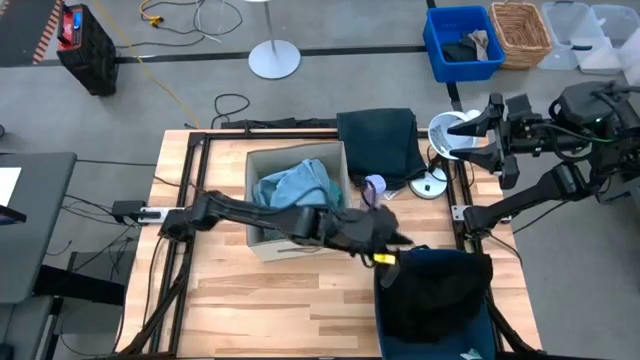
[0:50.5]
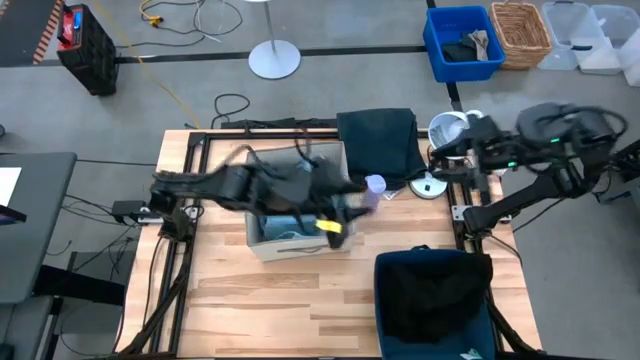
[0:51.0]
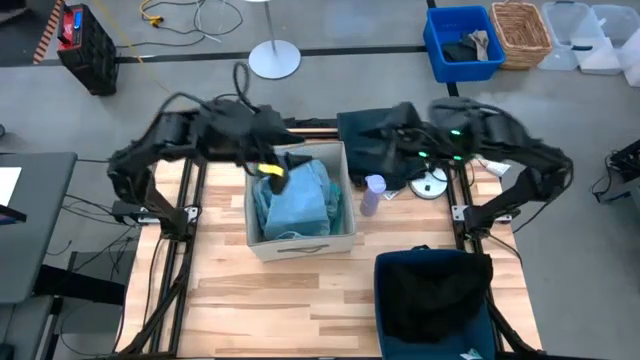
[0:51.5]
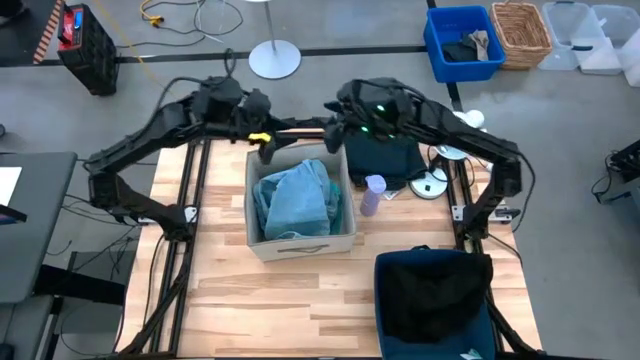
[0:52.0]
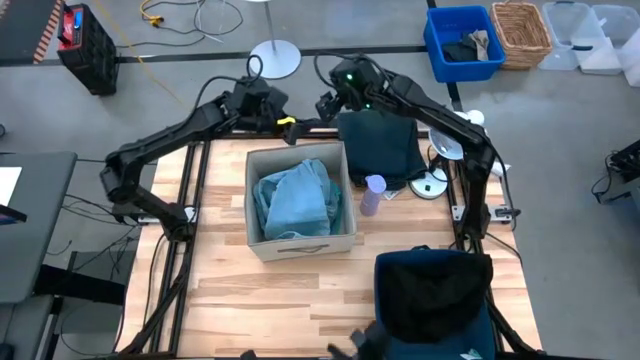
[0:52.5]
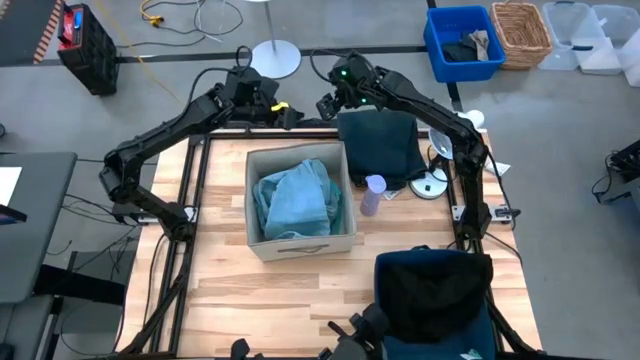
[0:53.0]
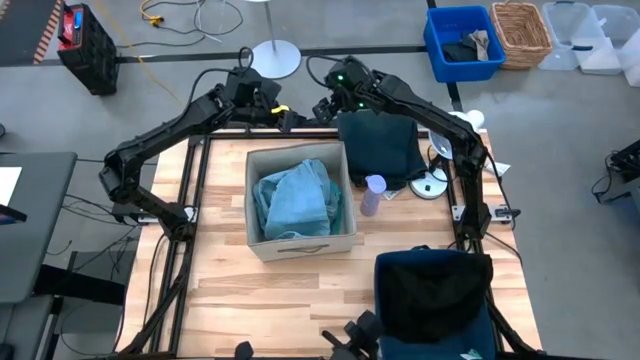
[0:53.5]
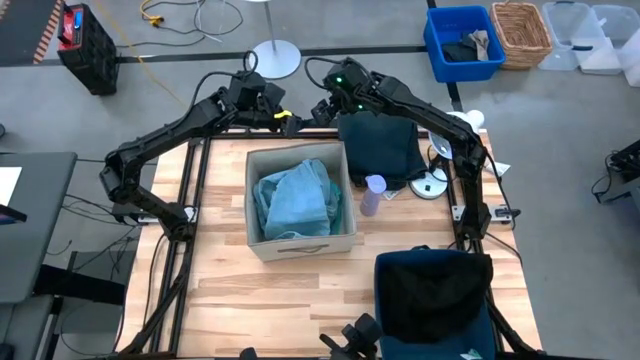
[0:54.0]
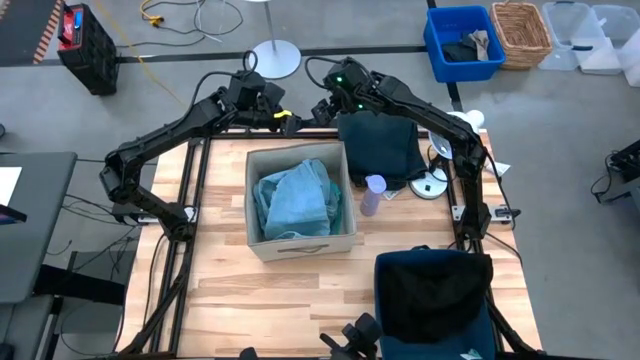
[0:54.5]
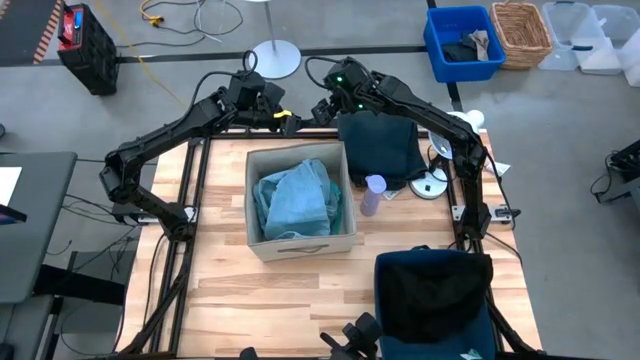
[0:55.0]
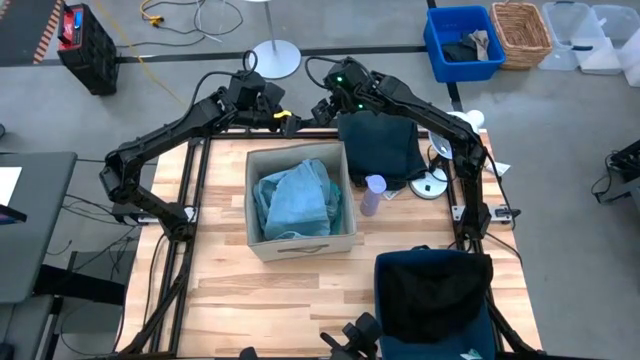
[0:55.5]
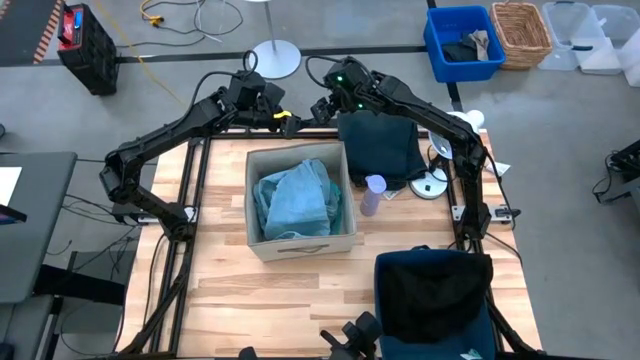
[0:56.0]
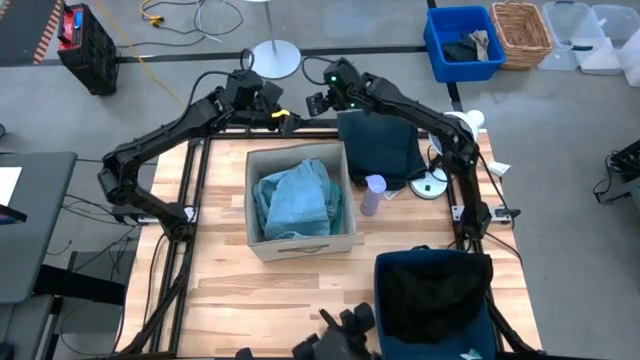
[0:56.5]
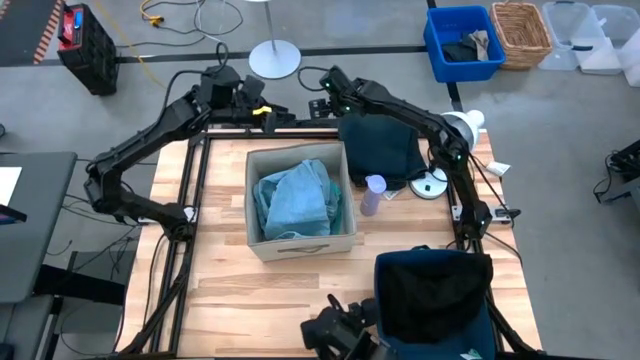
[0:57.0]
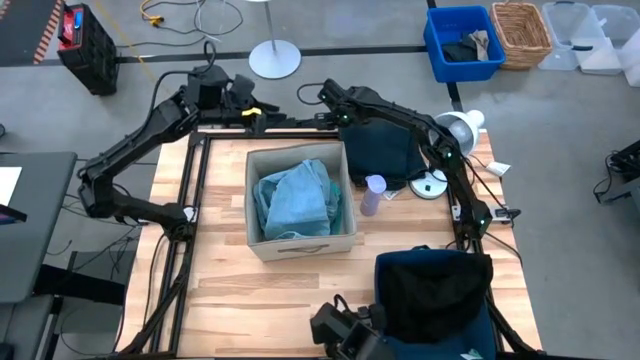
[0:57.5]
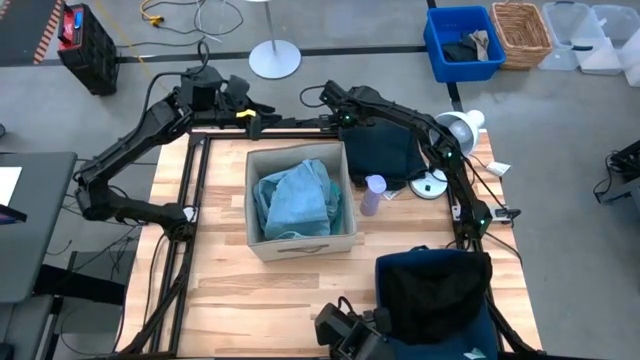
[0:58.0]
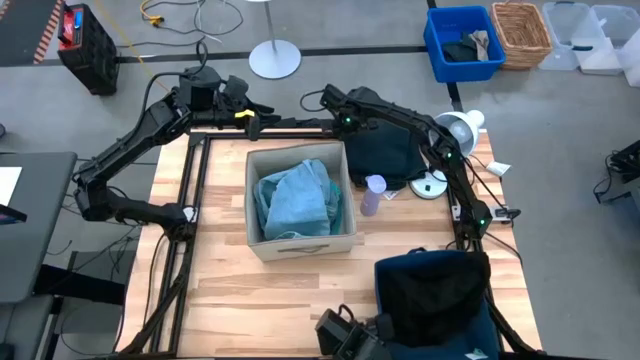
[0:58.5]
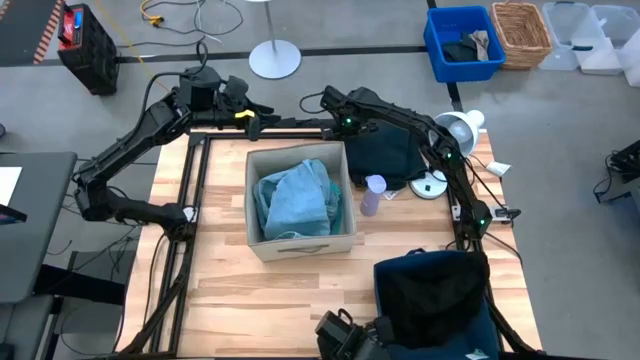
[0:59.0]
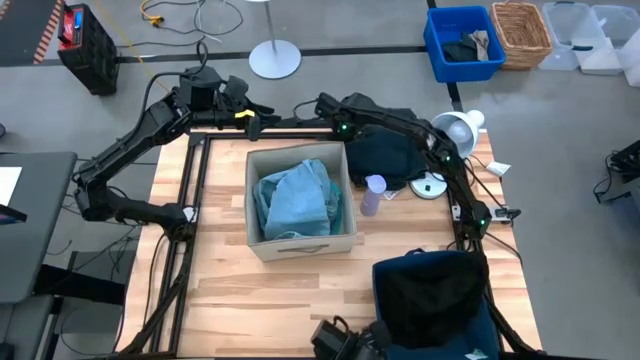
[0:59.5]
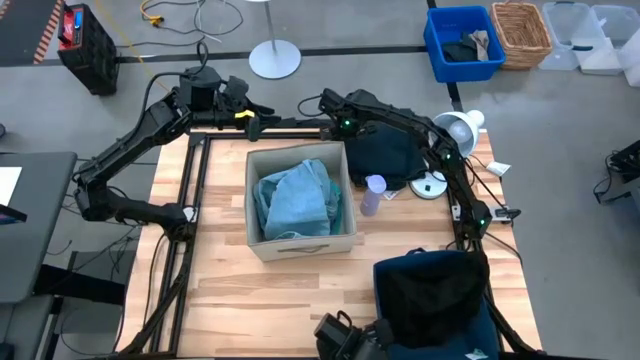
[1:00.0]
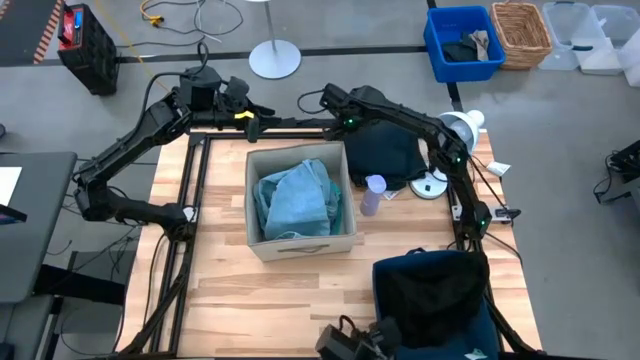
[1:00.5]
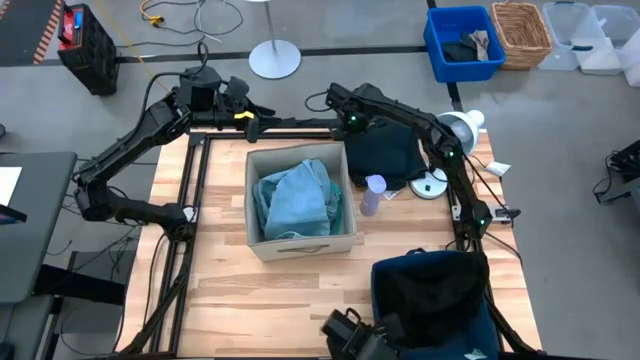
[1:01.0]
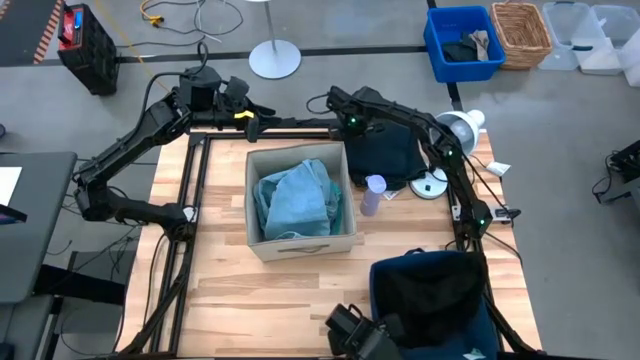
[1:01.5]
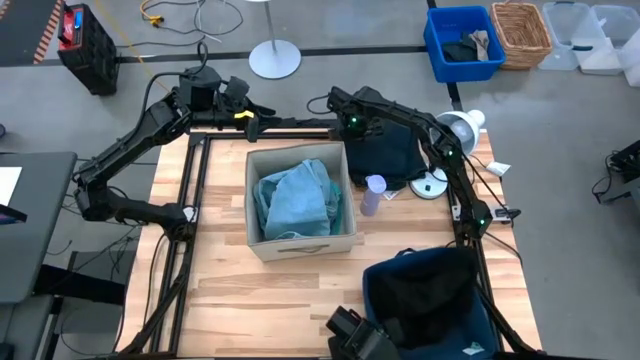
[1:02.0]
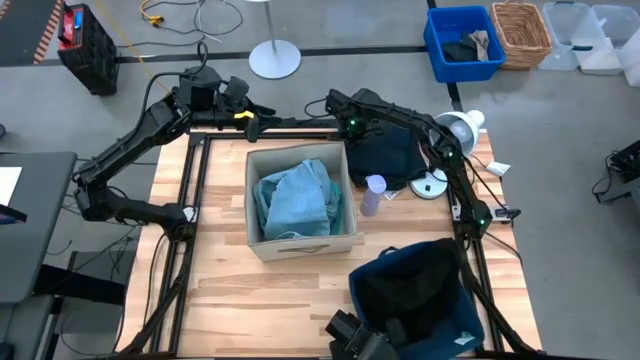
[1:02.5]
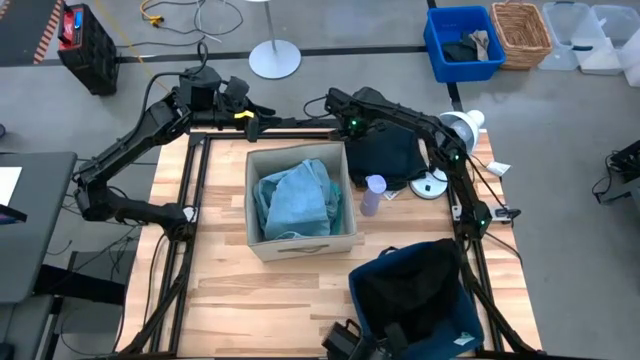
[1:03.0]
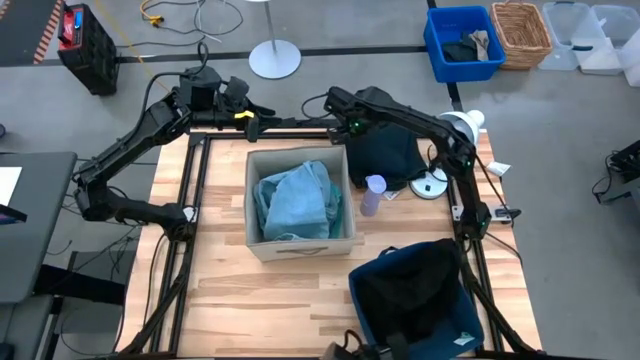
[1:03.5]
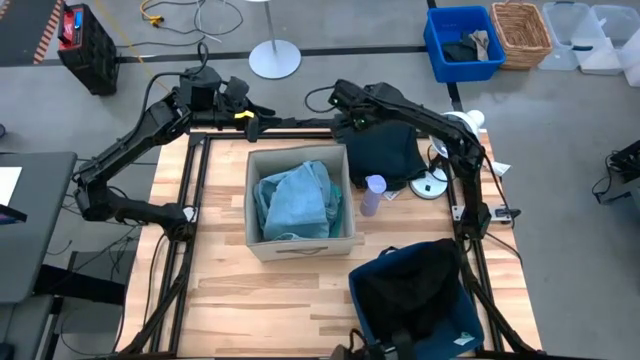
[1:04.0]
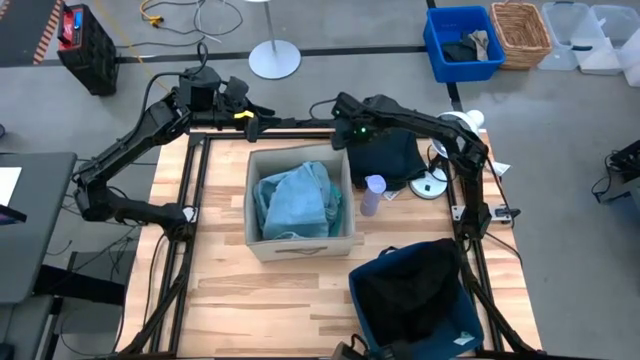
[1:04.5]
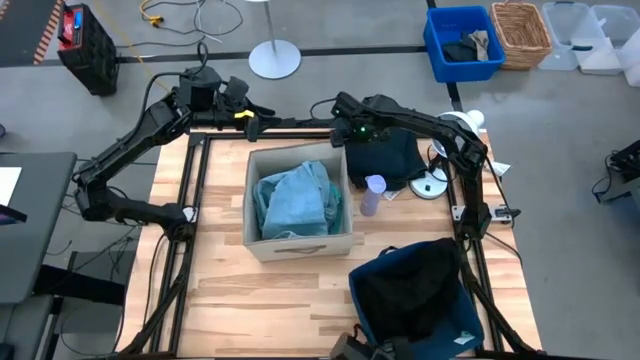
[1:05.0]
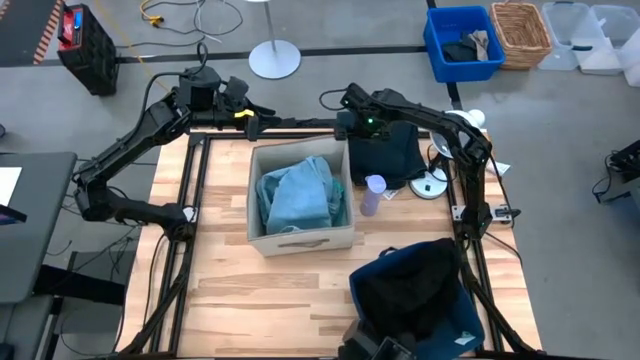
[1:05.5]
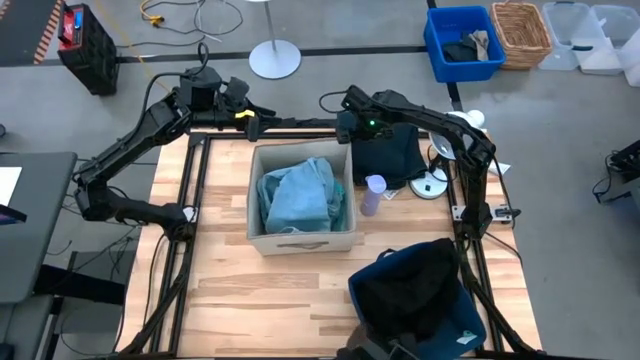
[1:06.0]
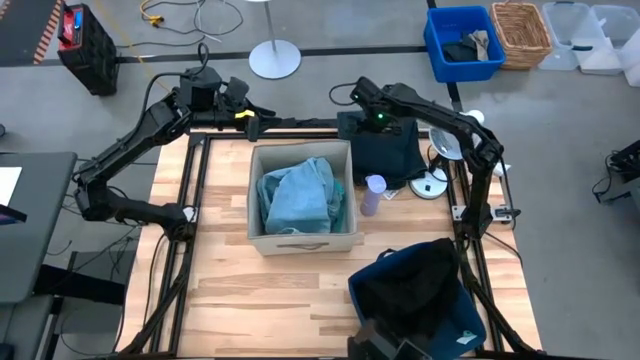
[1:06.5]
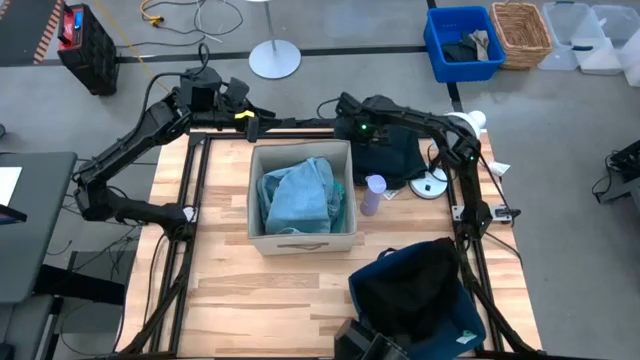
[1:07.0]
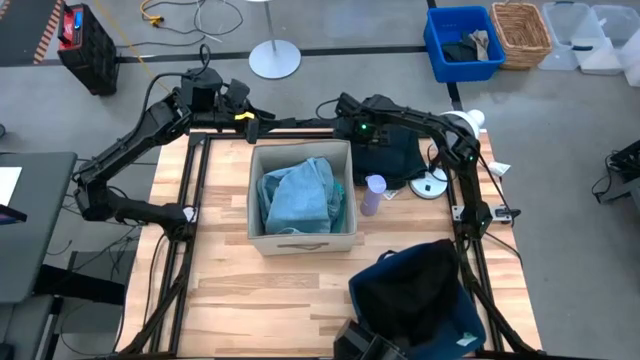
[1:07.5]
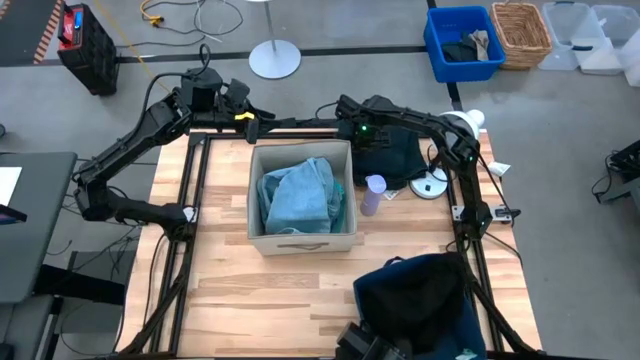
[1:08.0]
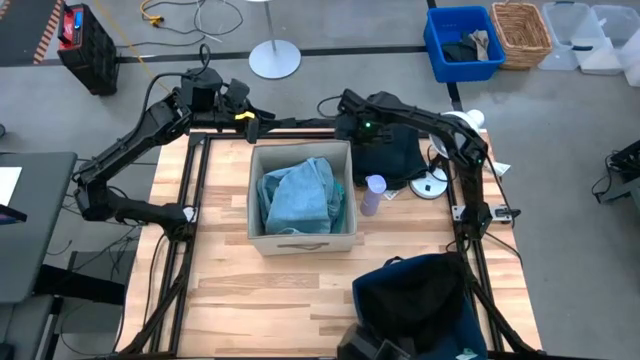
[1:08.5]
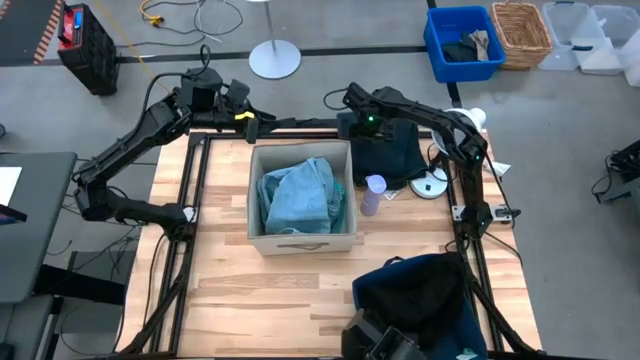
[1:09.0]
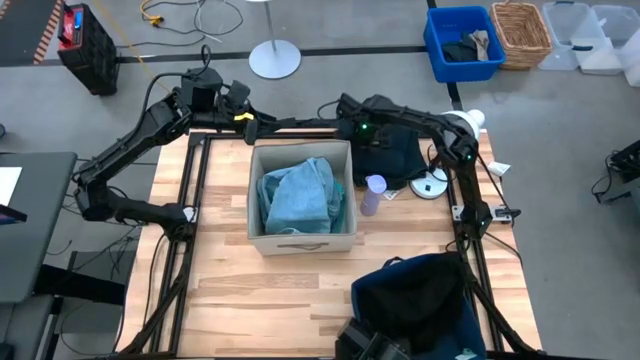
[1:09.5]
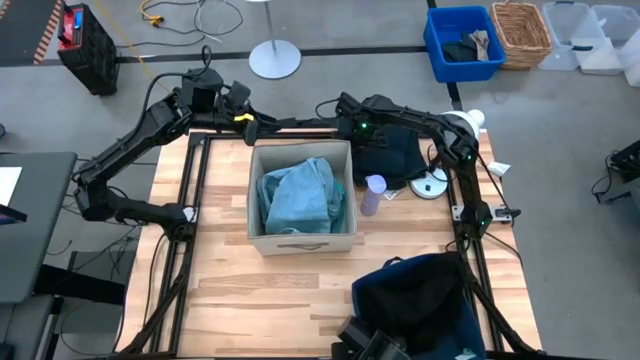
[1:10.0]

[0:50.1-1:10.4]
Task: Sort clothes
Put the black pants into the blue laundry bin

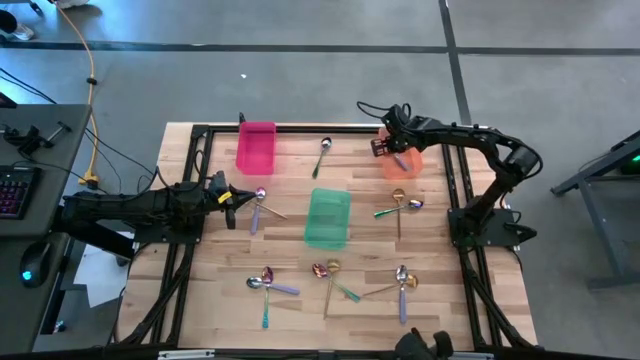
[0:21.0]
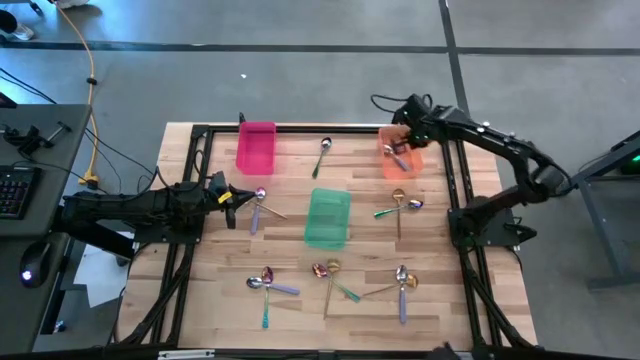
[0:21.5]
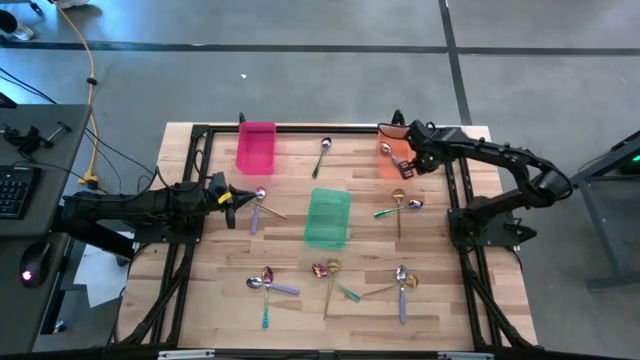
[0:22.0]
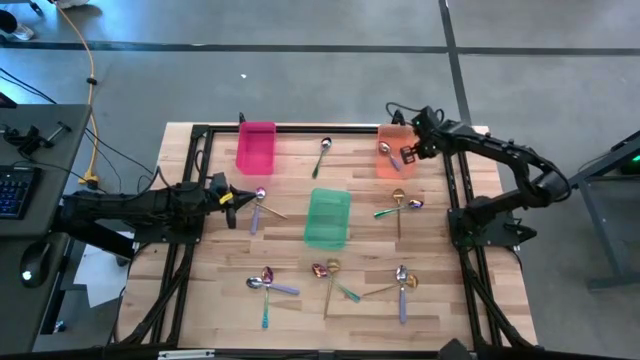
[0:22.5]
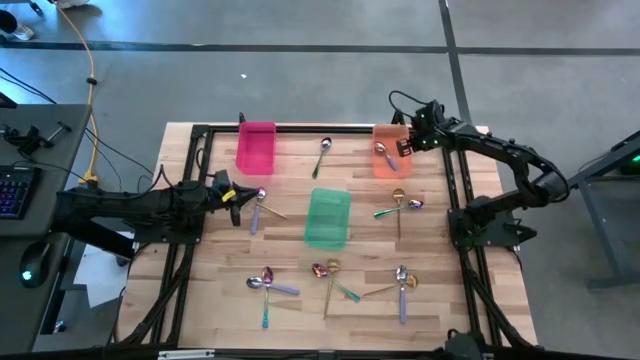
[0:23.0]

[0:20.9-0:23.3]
Task: Sort silverware by color (type)
Adjust the orange bin
